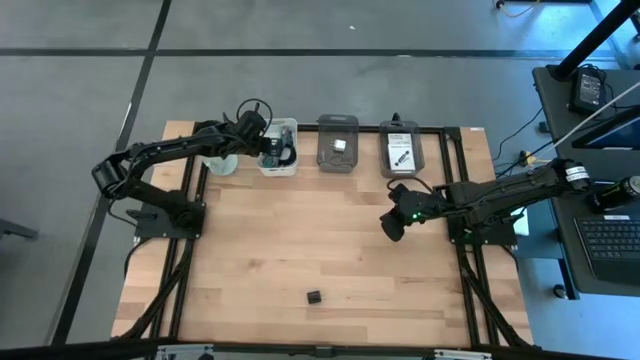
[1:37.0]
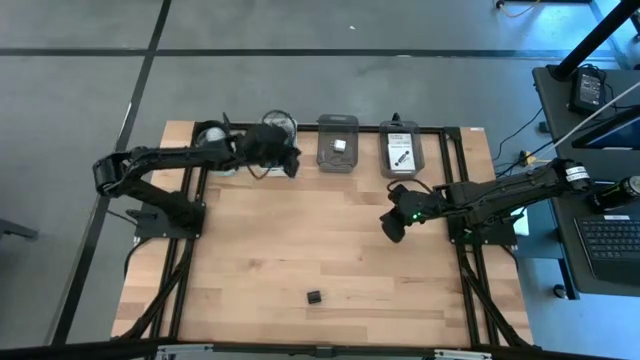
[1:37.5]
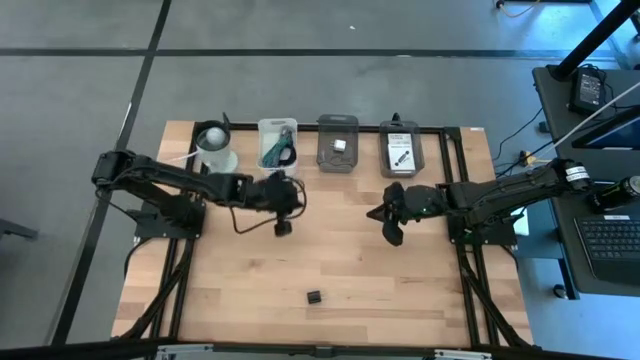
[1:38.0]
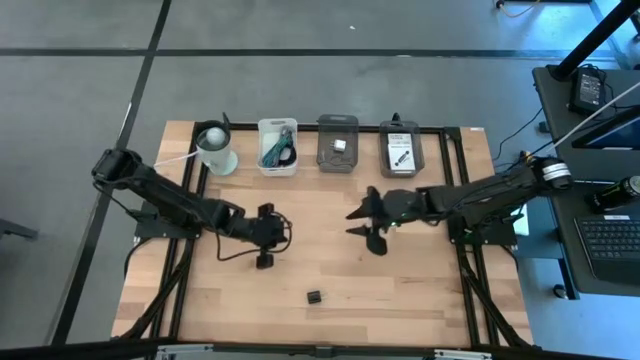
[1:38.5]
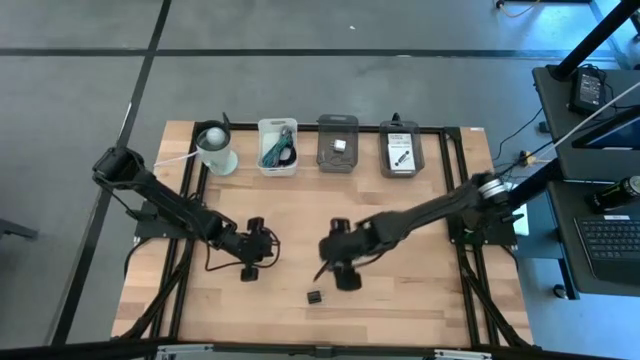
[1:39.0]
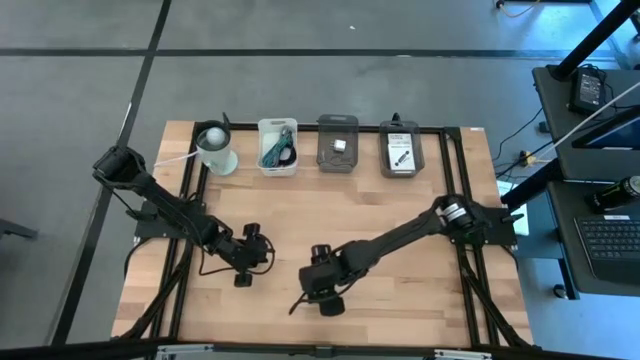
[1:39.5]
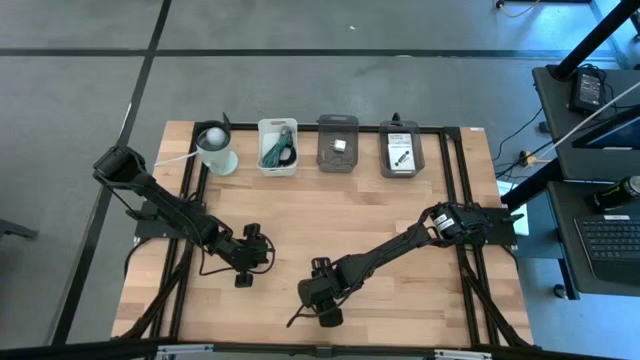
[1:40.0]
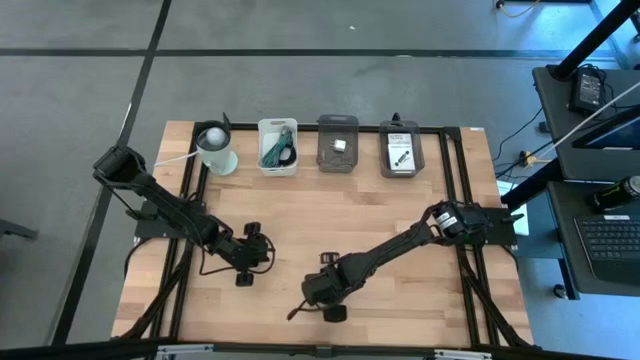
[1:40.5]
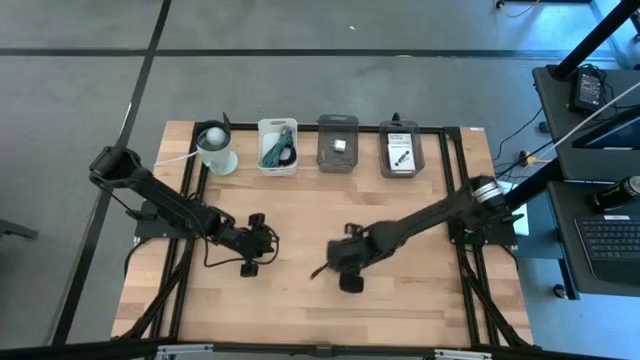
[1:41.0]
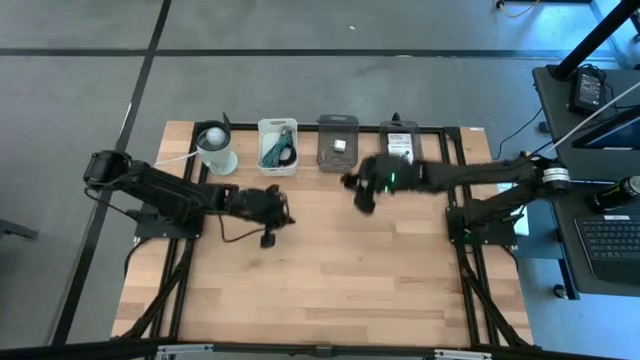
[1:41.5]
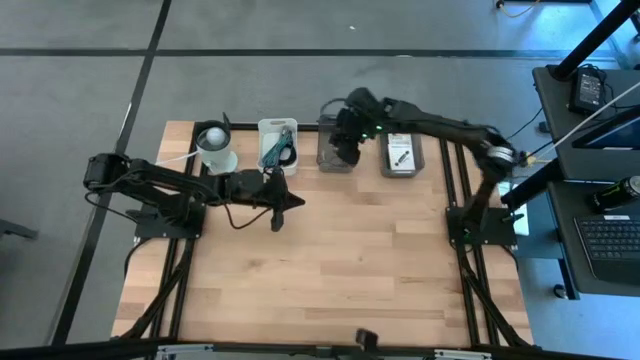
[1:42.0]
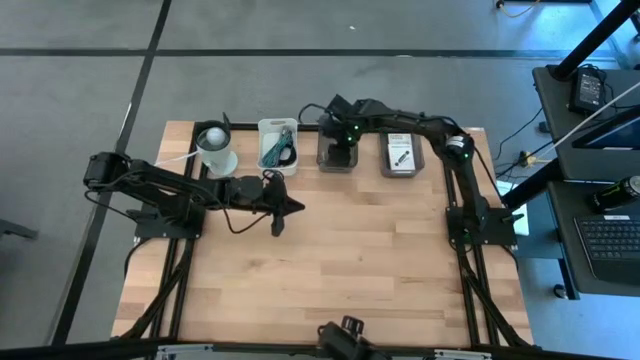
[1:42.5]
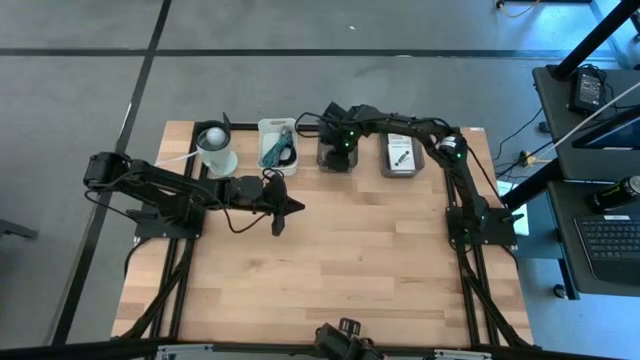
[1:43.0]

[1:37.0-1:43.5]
Task: Pick and place items into bin
Put the black charger adapter into the left black bin

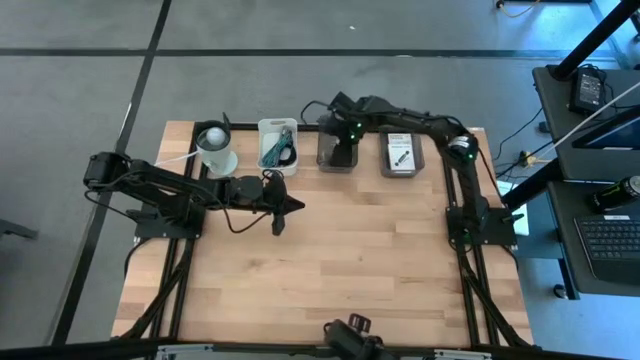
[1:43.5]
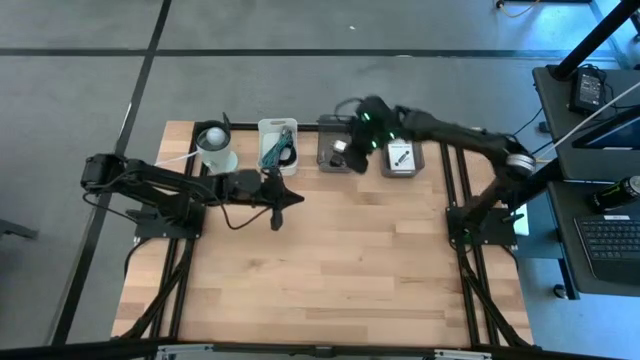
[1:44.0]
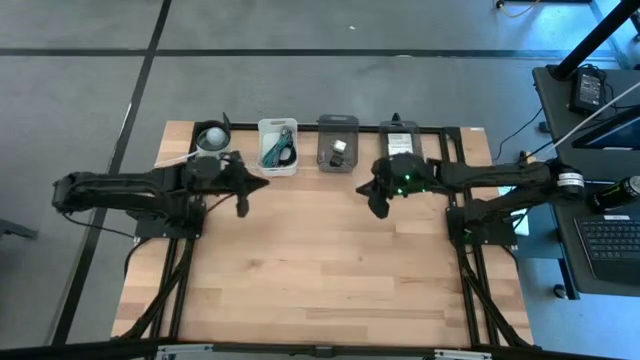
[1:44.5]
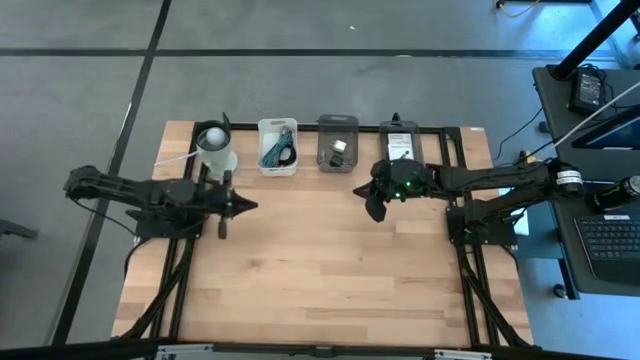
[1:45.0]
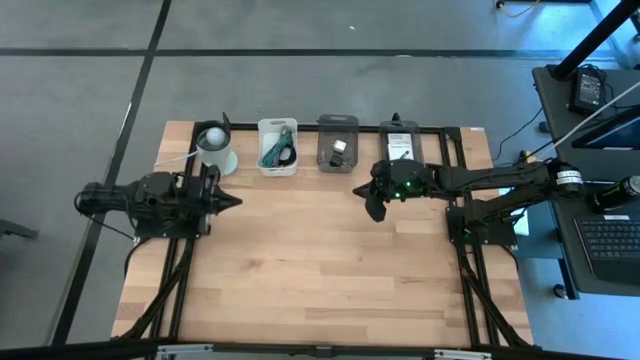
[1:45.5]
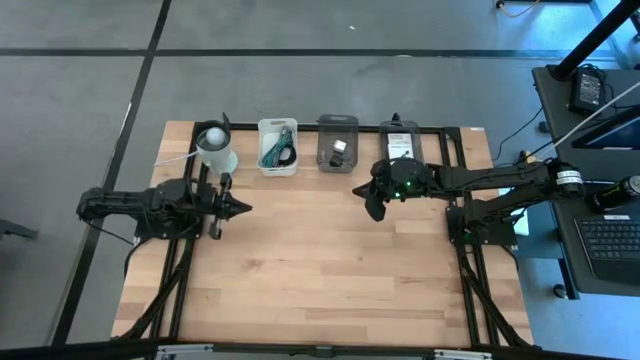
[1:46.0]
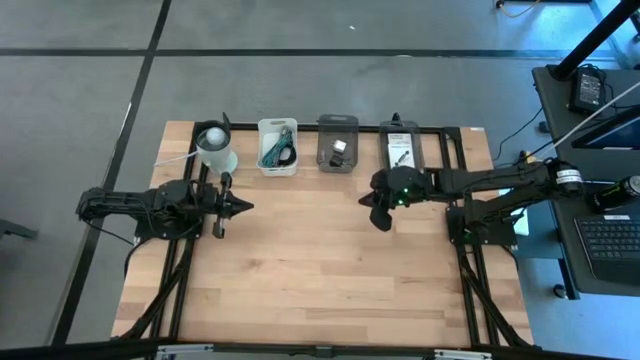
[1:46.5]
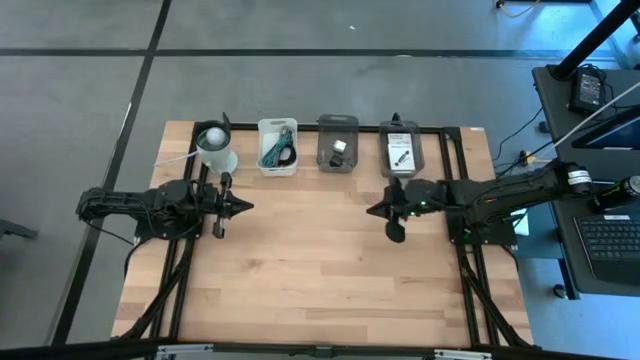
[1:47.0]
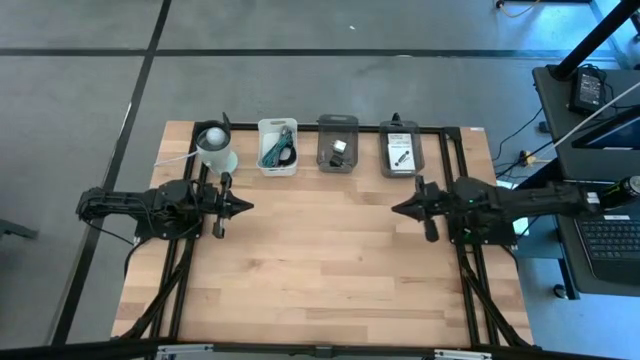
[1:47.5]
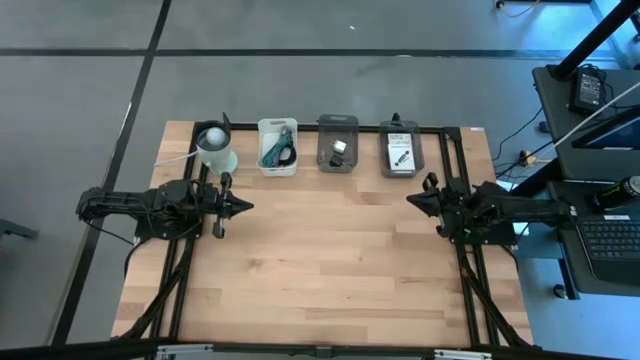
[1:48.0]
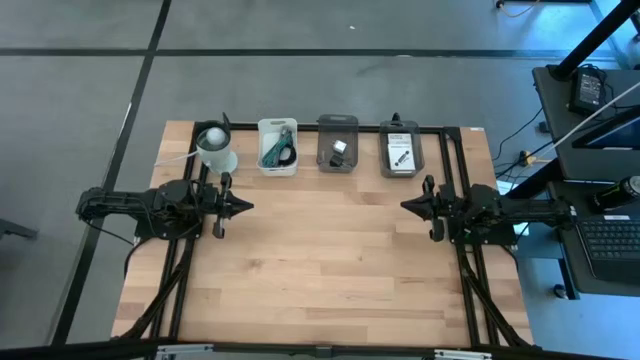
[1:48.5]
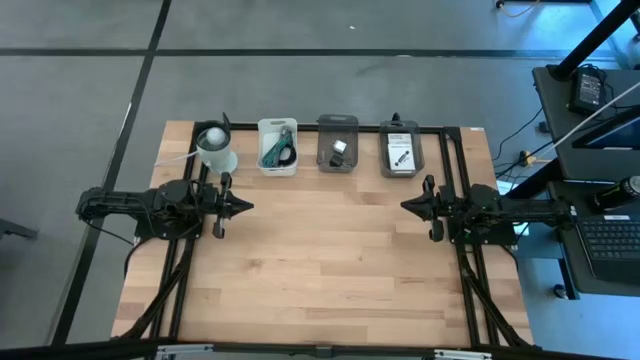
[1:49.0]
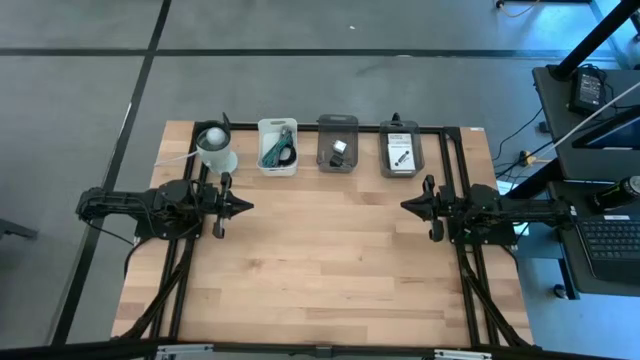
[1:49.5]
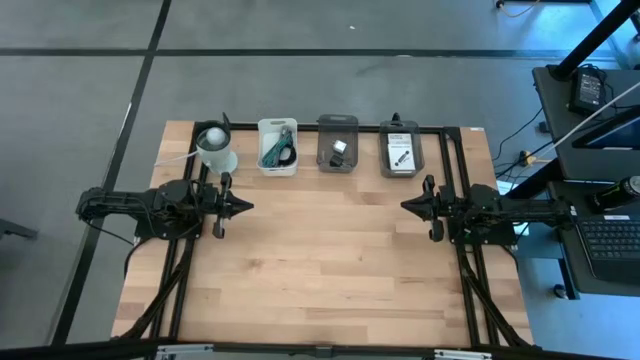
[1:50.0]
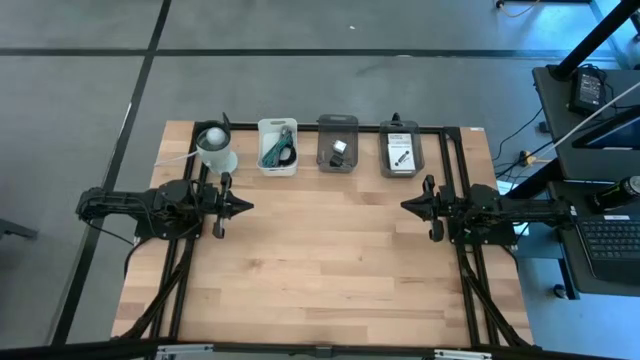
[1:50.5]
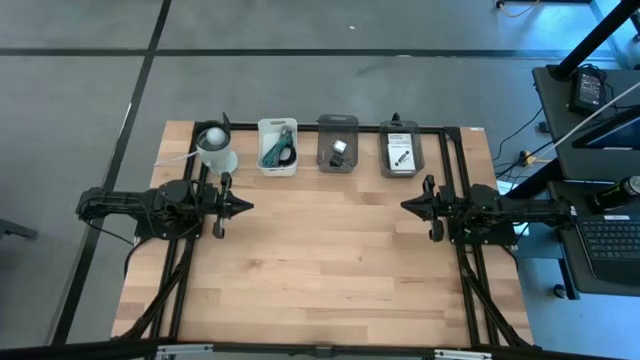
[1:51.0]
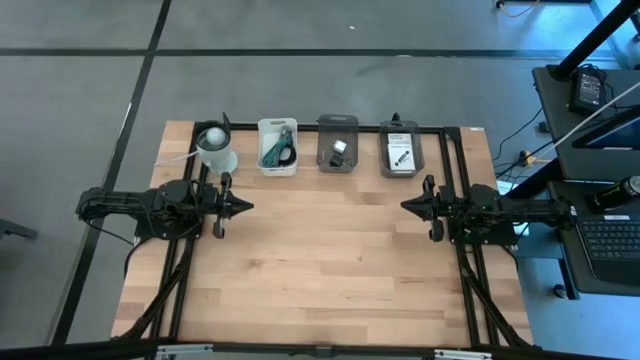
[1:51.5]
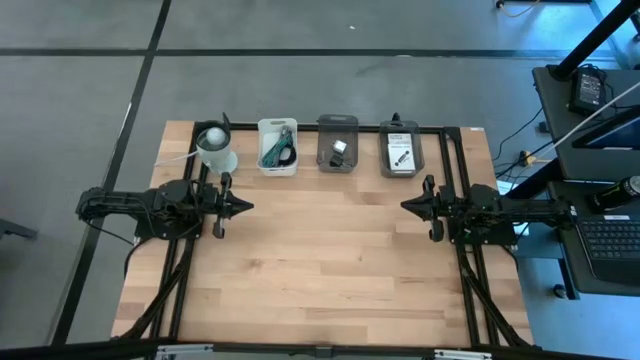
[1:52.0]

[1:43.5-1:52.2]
Return to Home Position

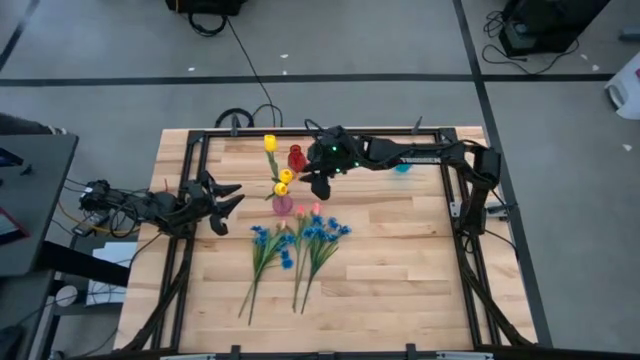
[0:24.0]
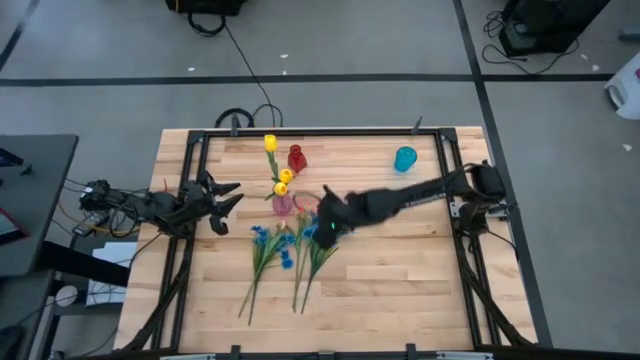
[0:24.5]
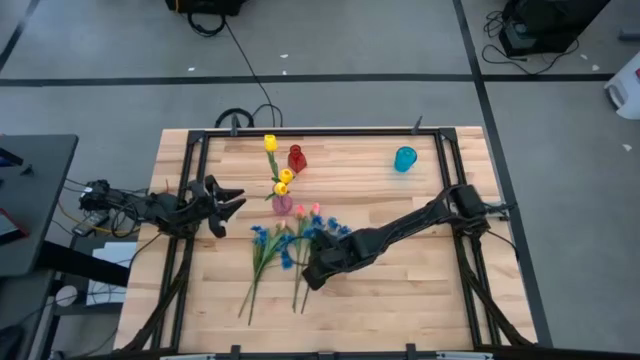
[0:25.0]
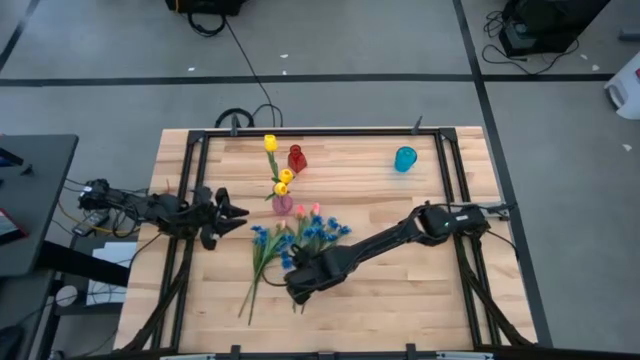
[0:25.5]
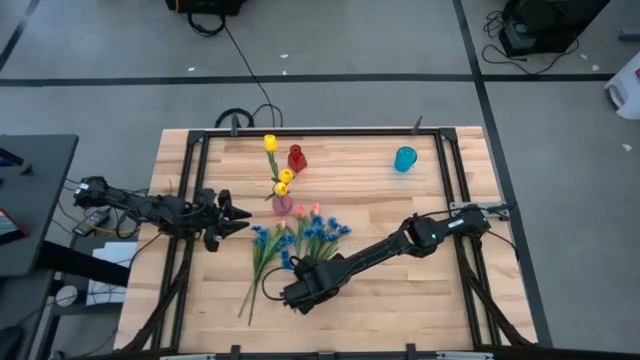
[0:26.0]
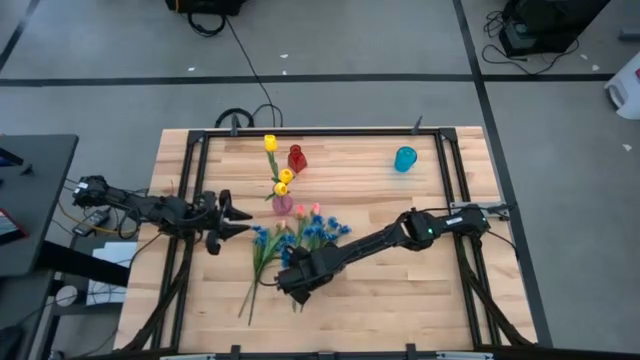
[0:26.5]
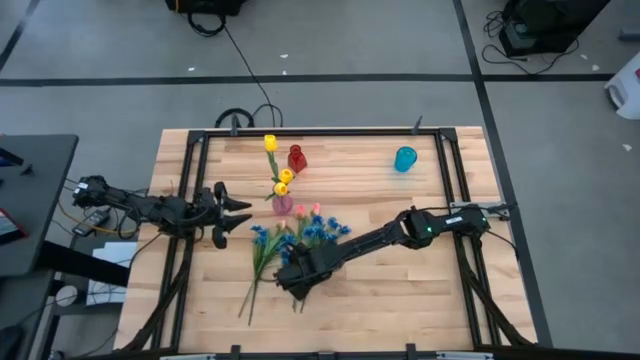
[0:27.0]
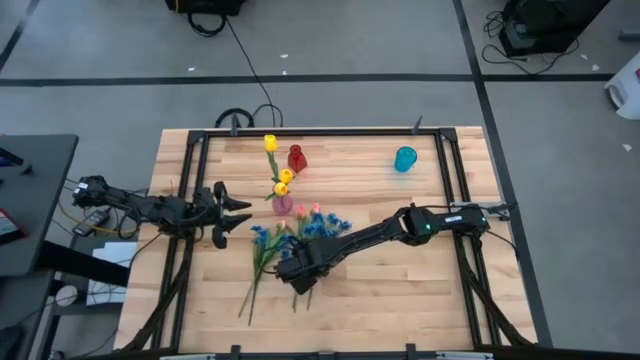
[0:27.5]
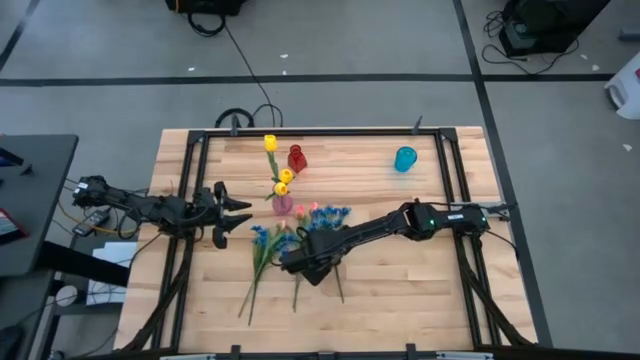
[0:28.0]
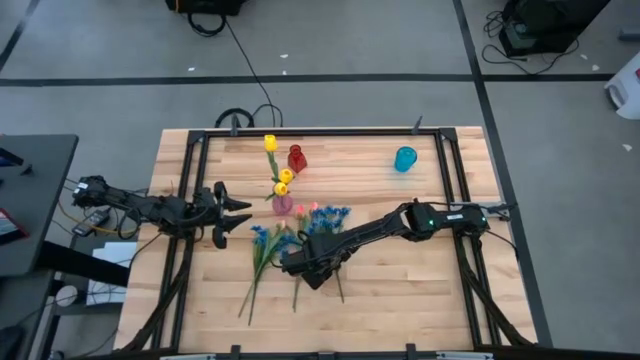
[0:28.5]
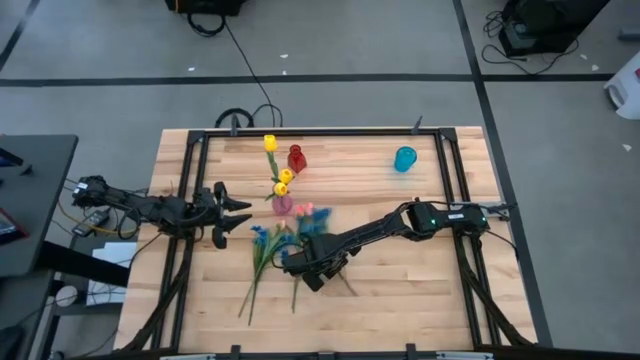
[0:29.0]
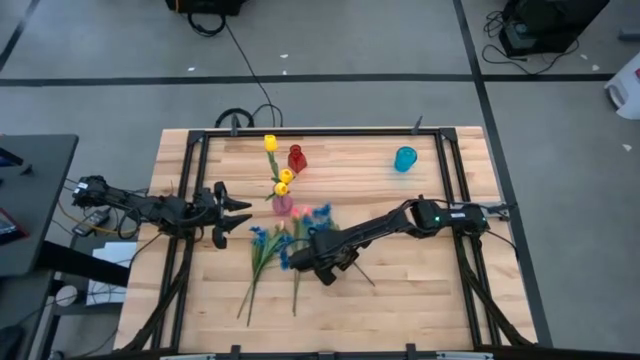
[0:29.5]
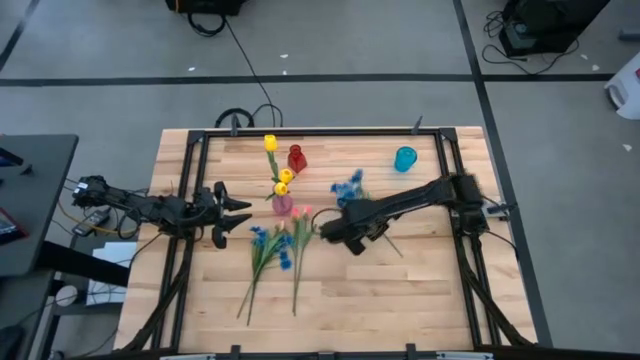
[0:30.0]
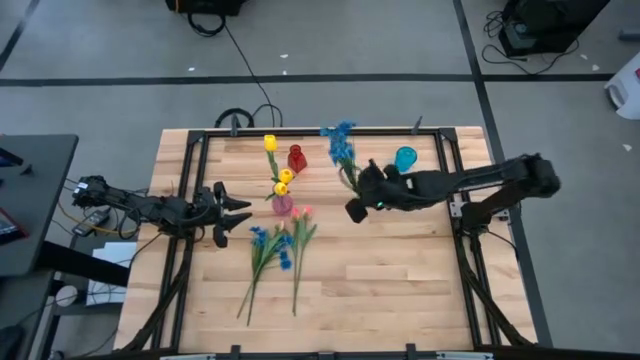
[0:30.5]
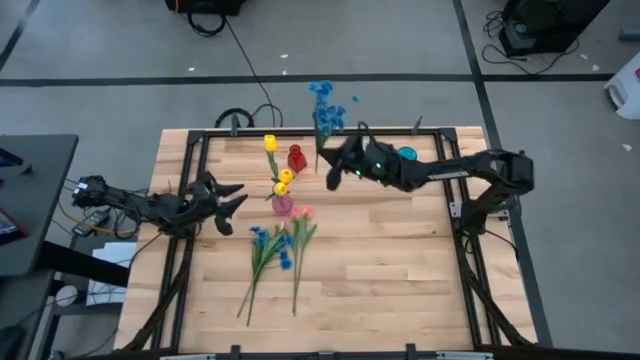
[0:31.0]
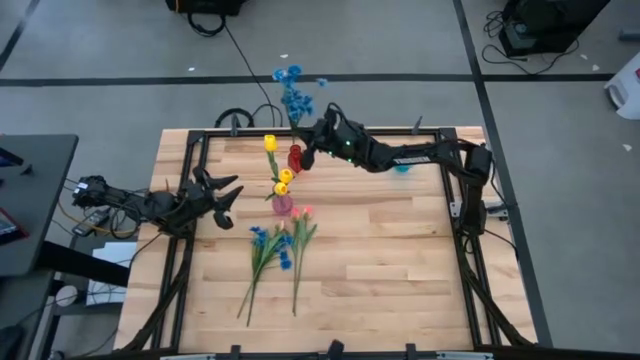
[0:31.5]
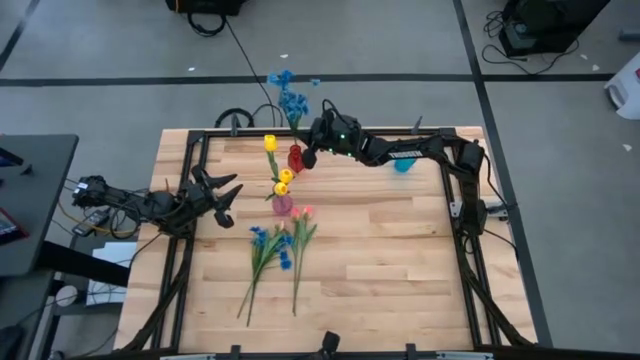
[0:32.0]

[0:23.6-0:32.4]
Task: Sort flowers into vase by color
Put the right blue lily into the red vase
